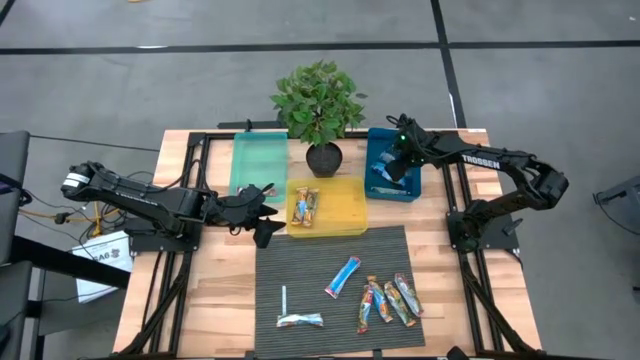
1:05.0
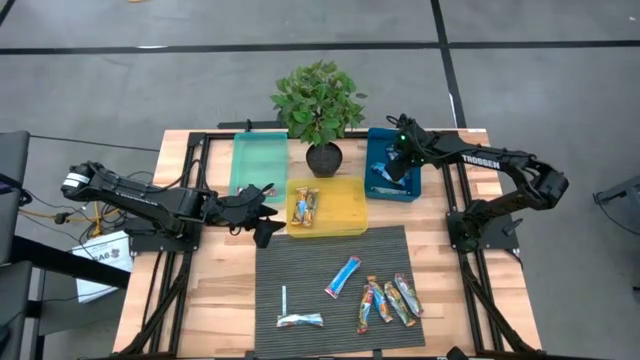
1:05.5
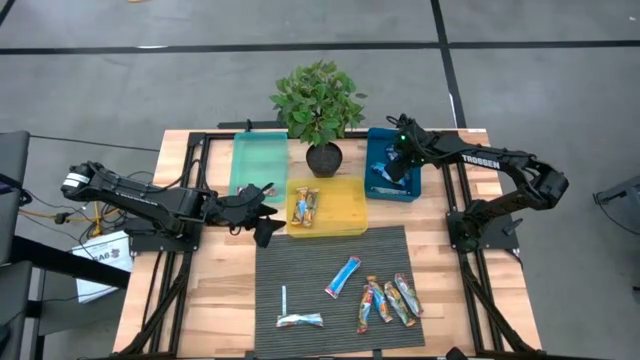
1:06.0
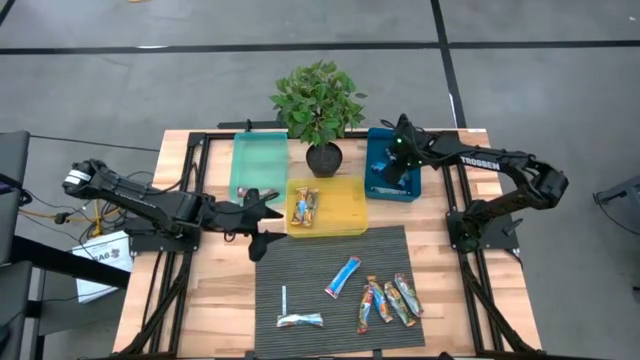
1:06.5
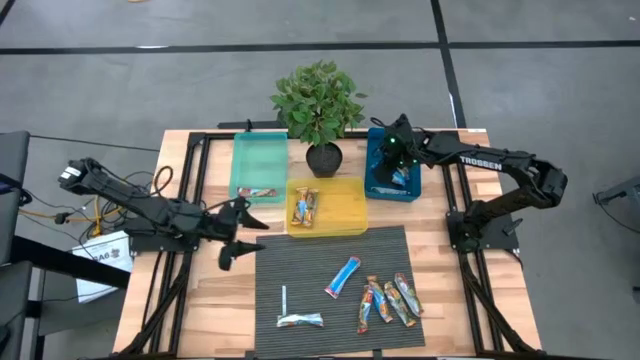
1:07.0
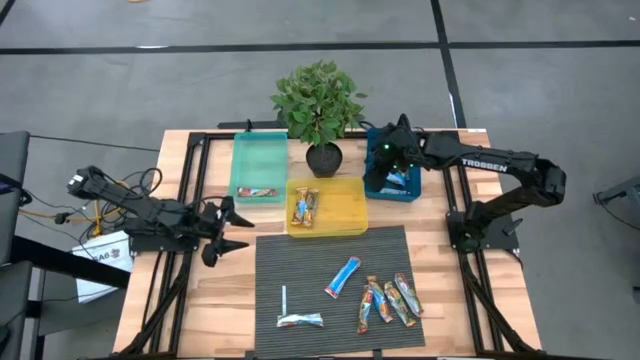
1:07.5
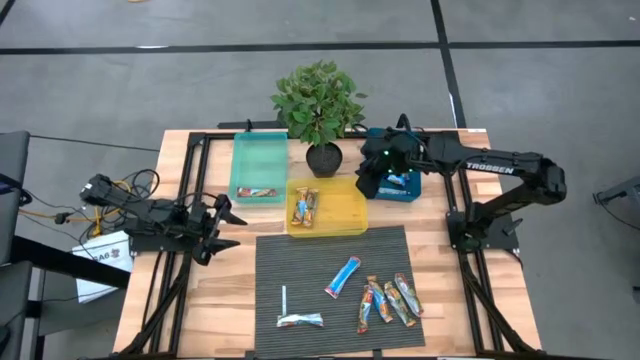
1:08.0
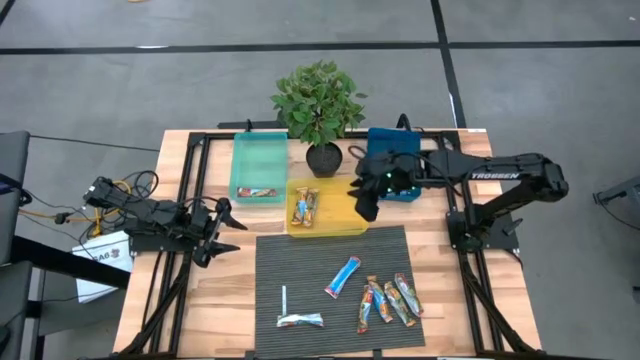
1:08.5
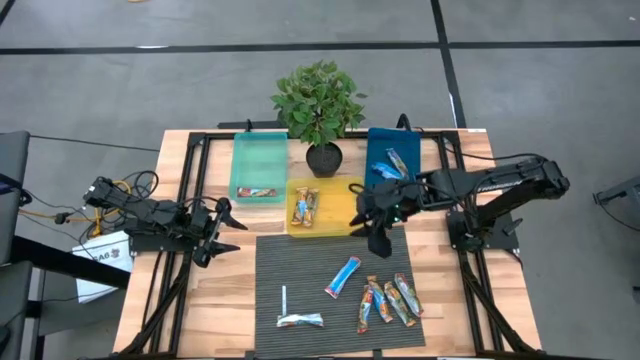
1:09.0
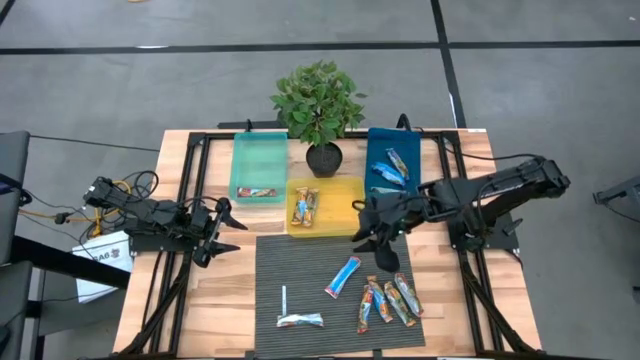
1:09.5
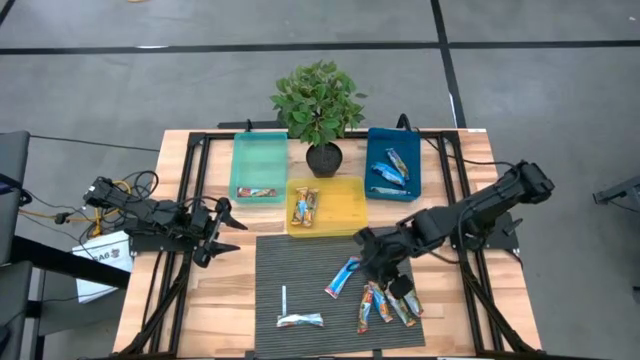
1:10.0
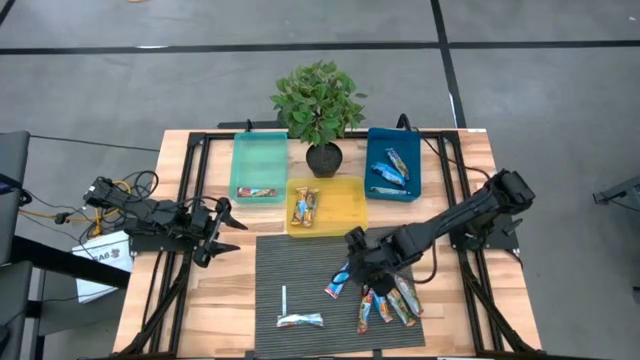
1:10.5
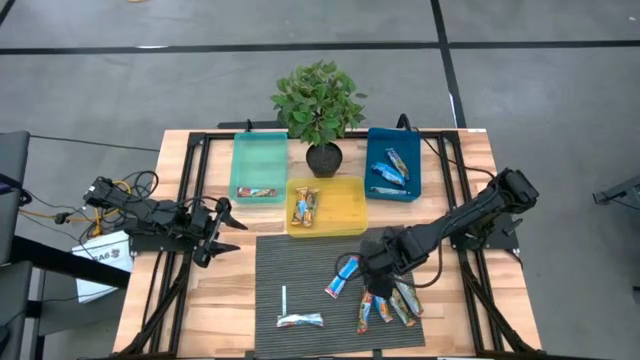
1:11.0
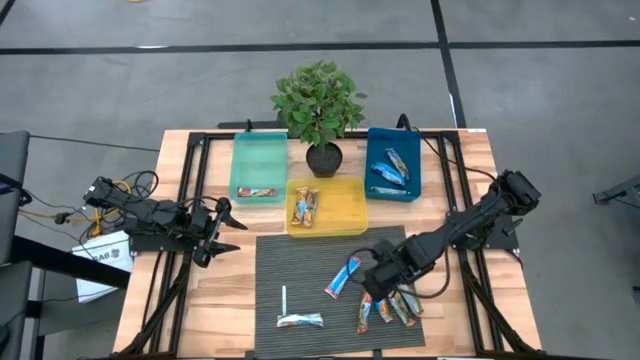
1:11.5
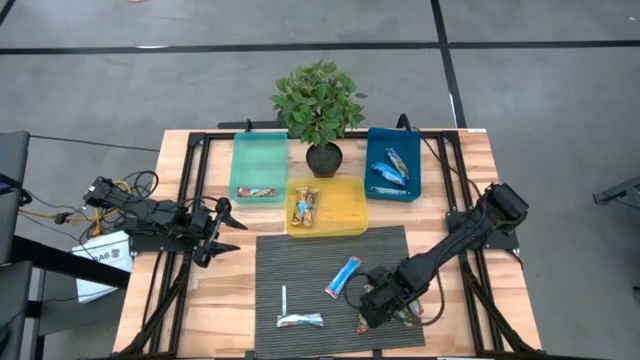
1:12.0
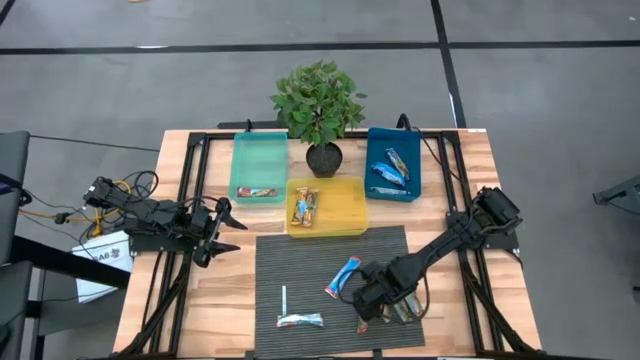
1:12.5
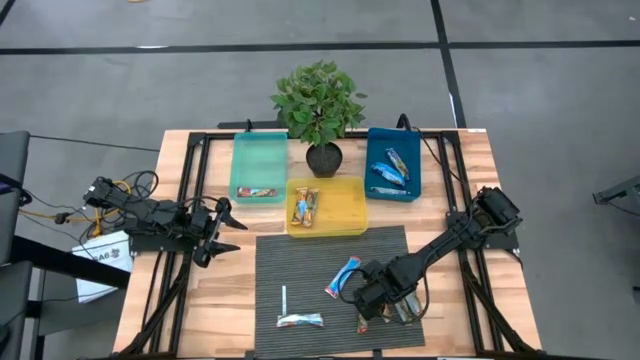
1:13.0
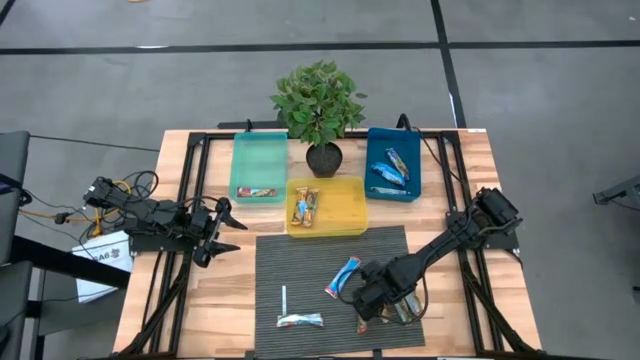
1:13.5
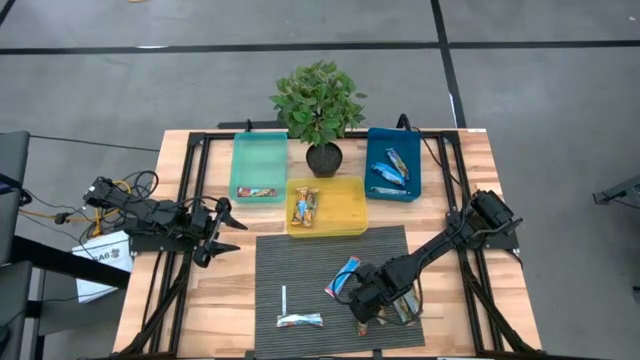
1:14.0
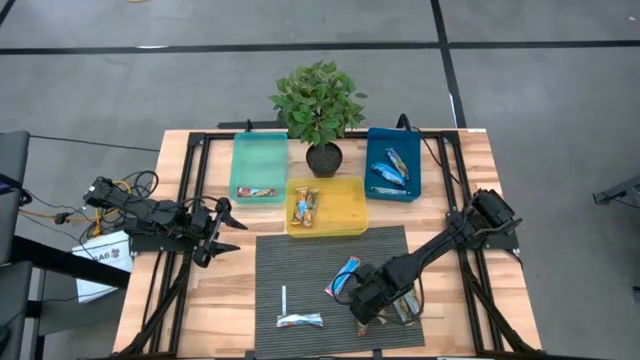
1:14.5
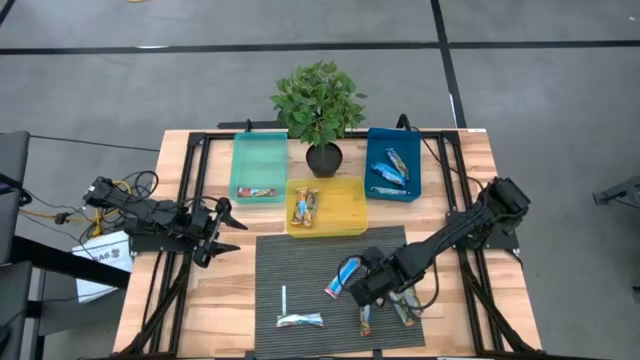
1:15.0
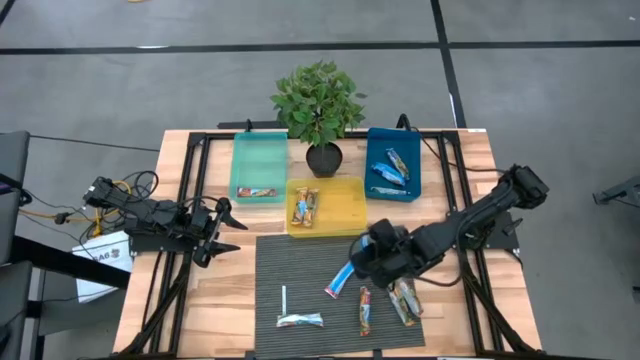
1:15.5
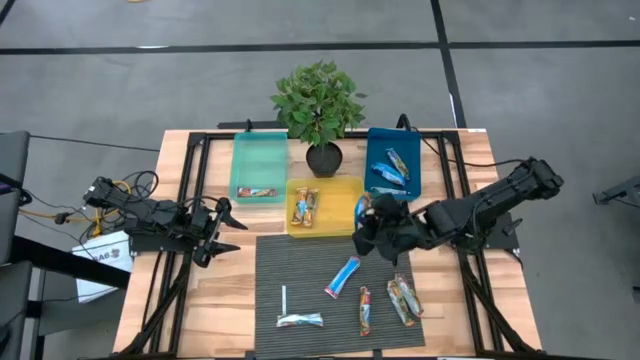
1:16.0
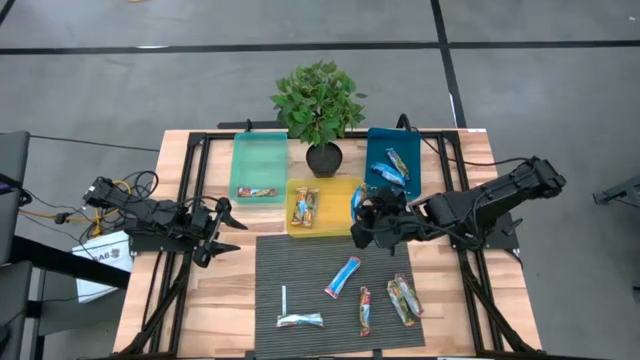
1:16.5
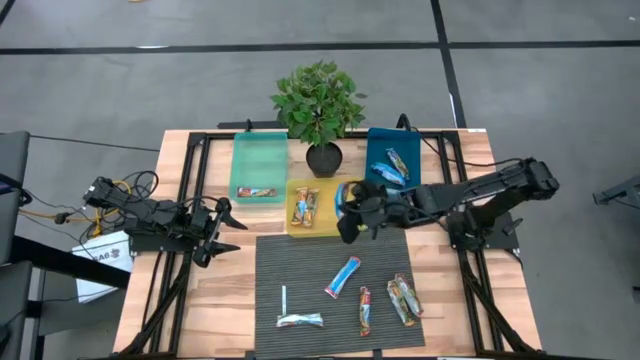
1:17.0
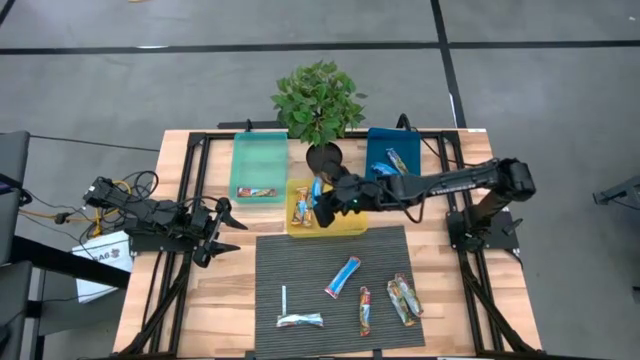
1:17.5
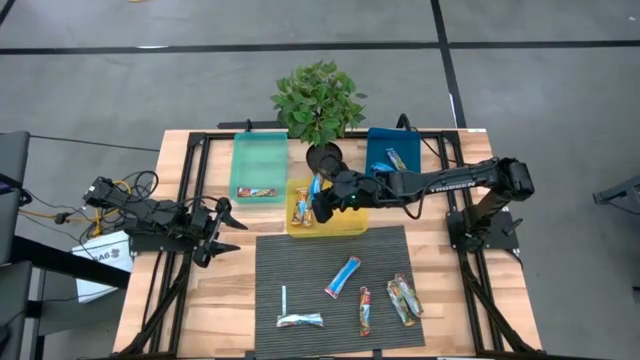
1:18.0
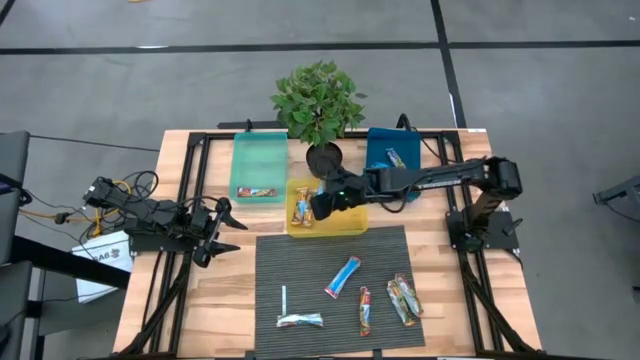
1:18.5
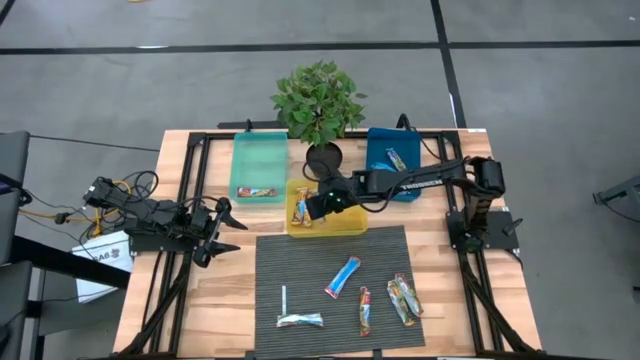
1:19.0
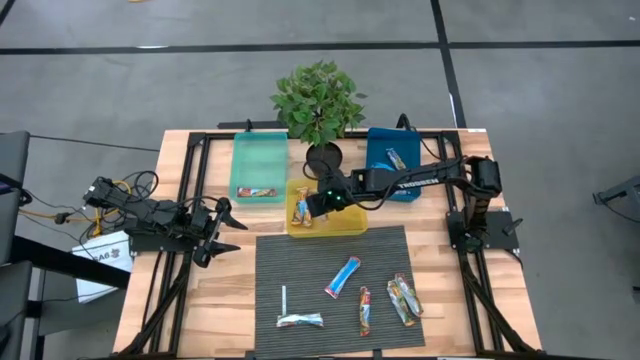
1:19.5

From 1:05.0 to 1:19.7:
Task: Pick and place Granola Bars by type
Put the orange granola bar into the yellow bin

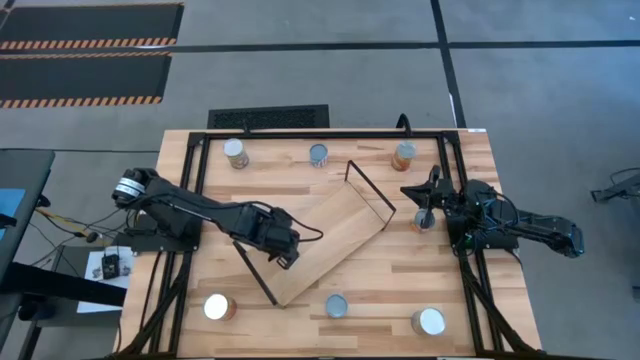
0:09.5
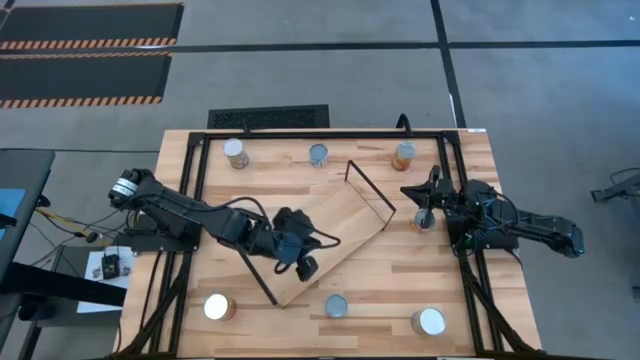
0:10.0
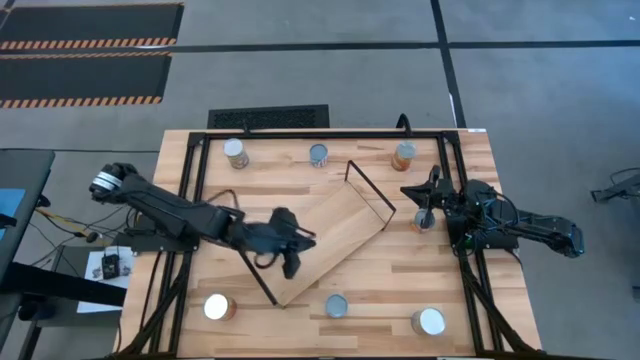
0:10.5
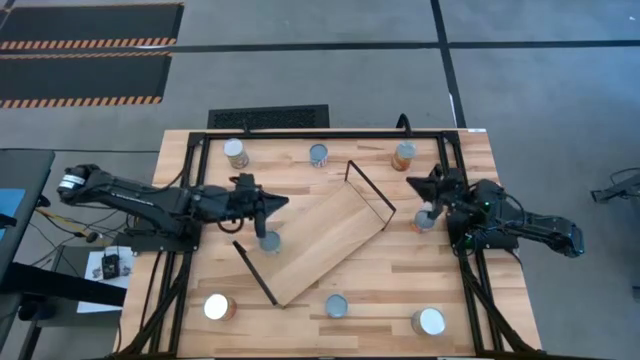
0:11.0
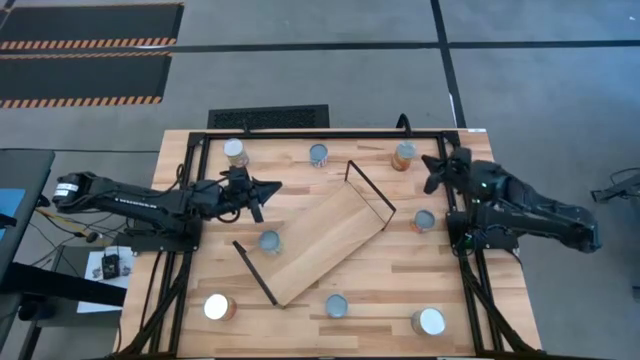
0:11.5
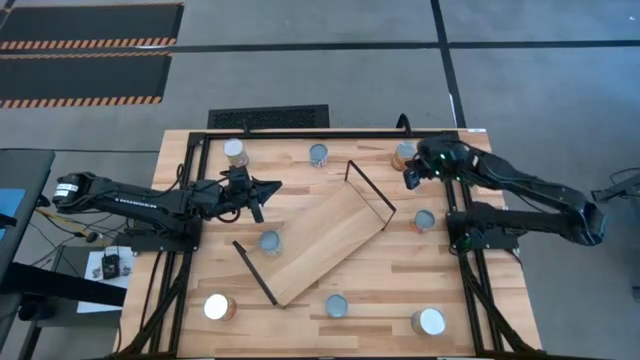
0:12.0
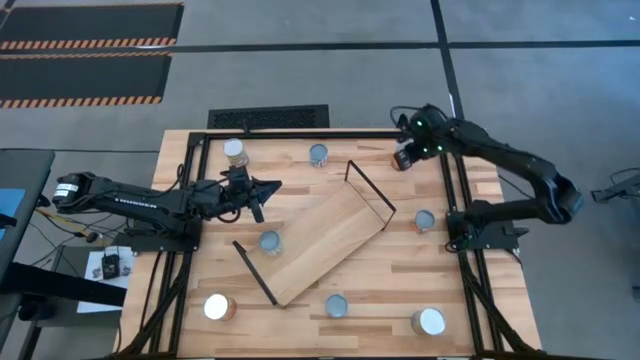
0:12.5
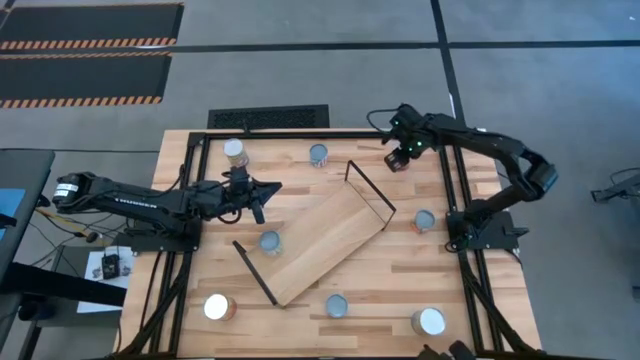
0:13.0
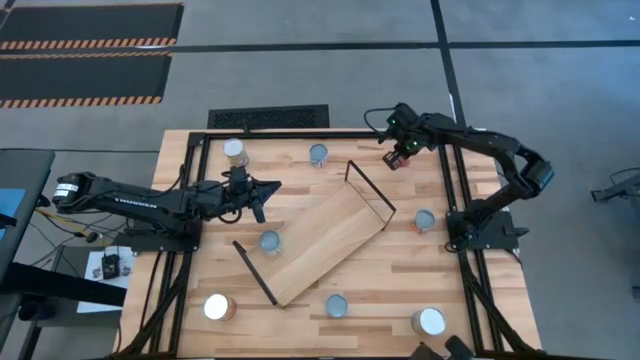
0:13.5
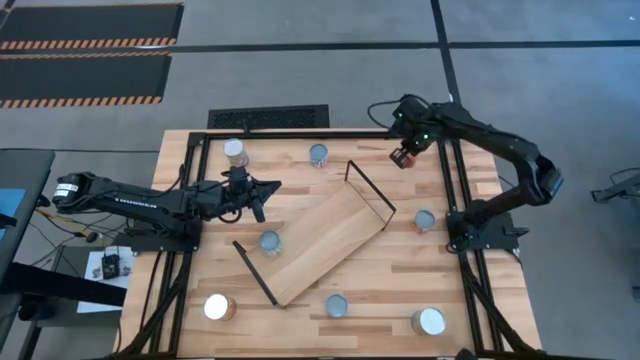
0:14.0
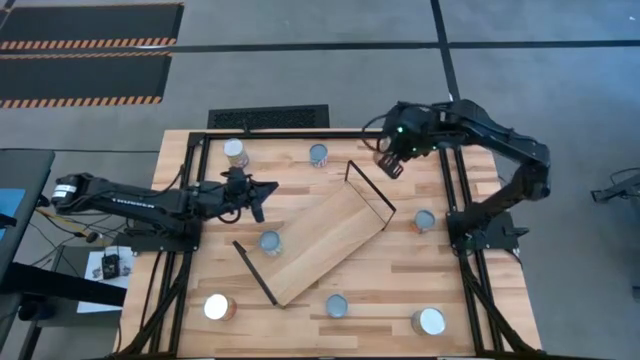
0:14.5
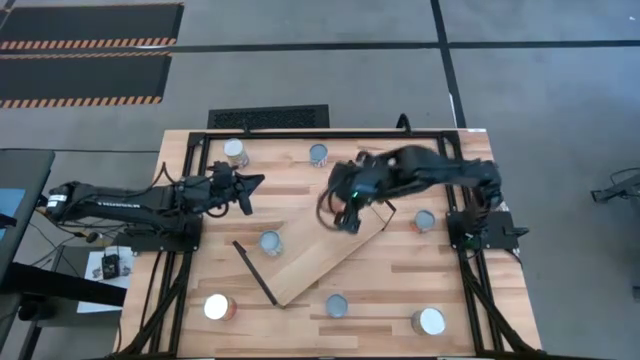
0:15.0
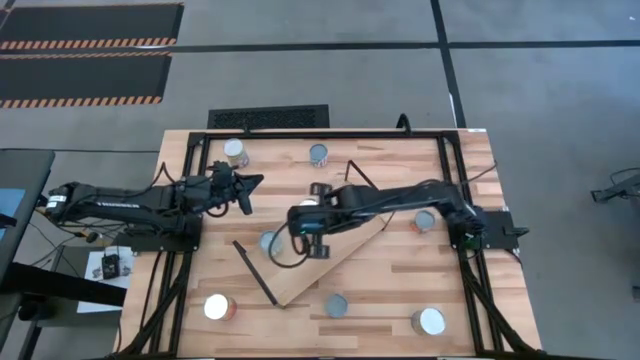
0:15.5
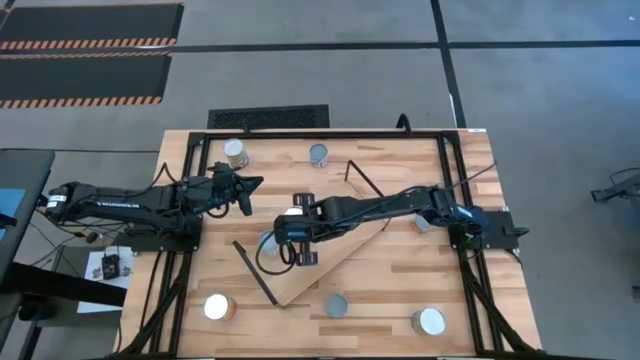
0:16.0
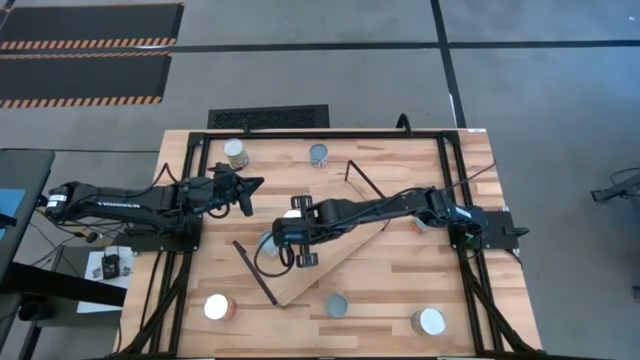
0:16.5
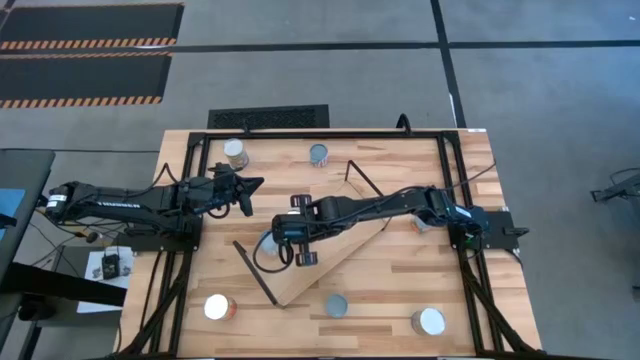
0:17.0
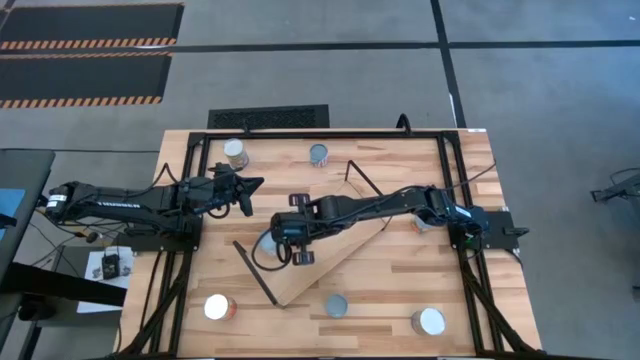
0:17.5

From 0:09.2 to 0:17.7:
Task: Pick and place cans onto a shelf
Put the top canned corn on the shelf
